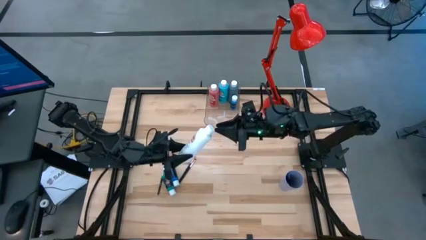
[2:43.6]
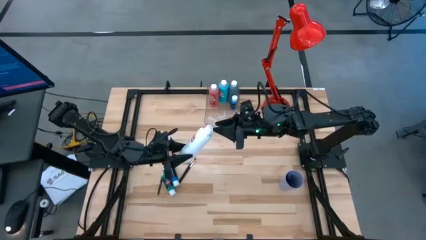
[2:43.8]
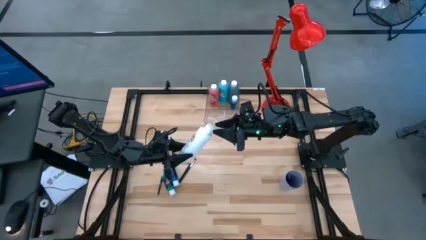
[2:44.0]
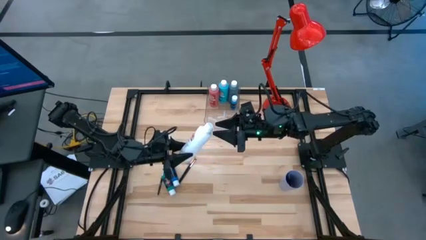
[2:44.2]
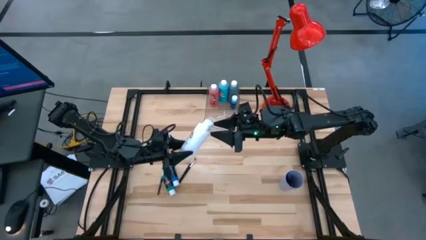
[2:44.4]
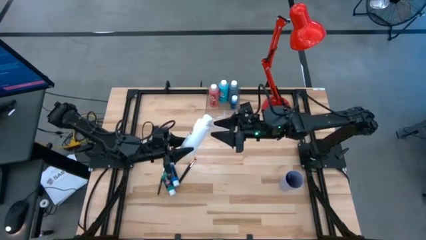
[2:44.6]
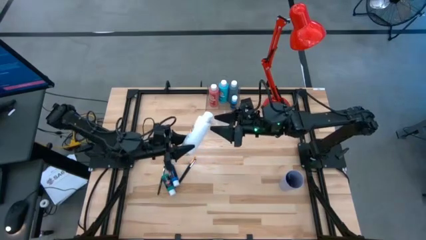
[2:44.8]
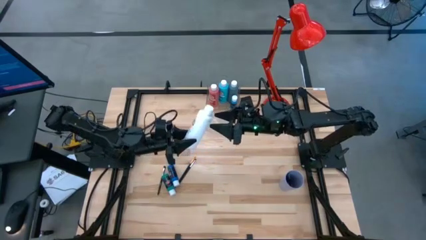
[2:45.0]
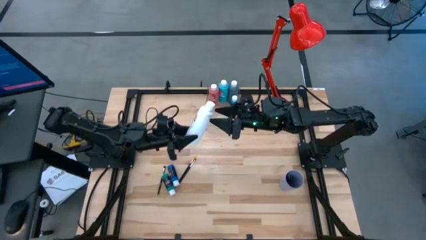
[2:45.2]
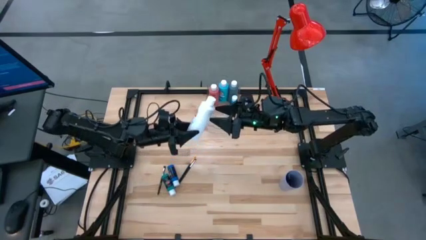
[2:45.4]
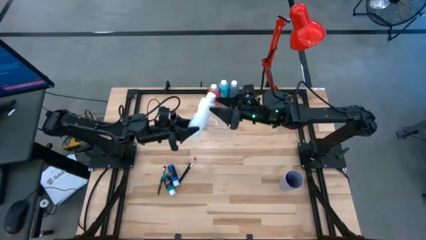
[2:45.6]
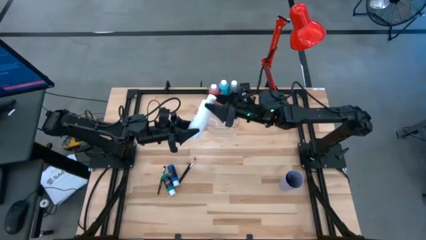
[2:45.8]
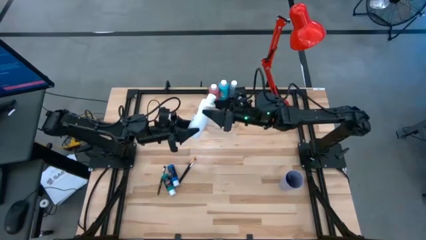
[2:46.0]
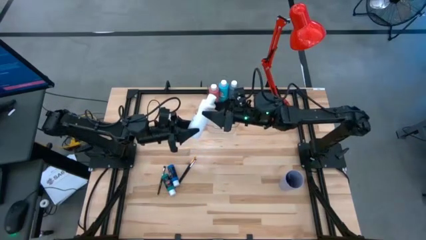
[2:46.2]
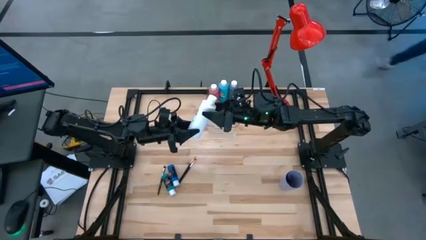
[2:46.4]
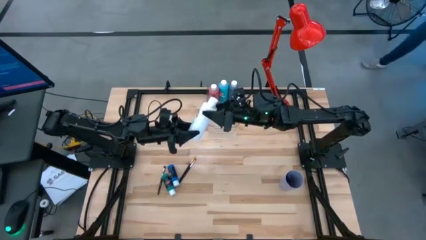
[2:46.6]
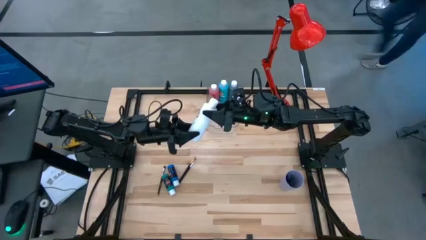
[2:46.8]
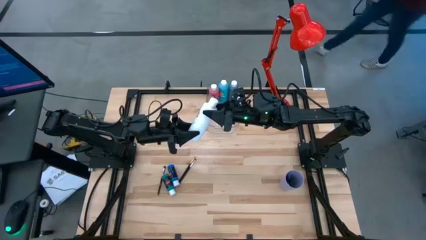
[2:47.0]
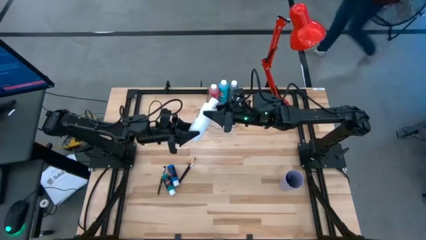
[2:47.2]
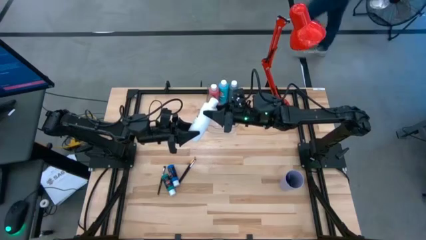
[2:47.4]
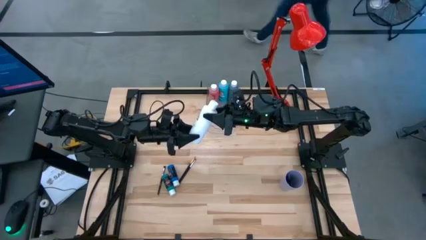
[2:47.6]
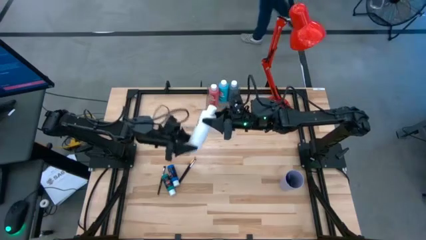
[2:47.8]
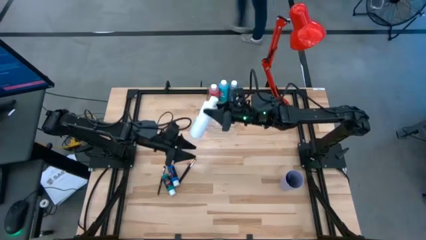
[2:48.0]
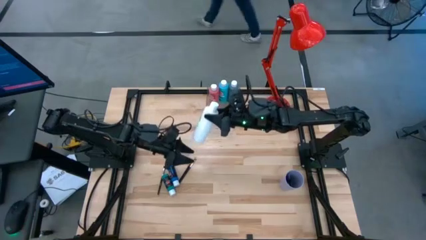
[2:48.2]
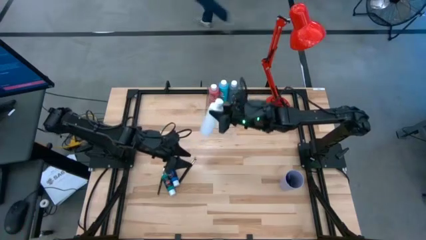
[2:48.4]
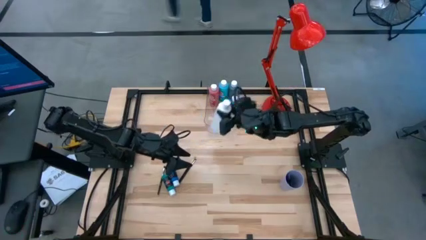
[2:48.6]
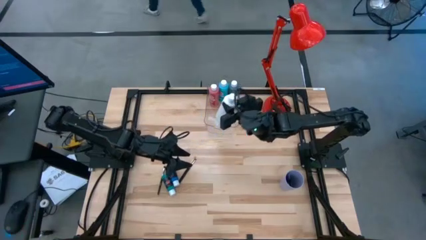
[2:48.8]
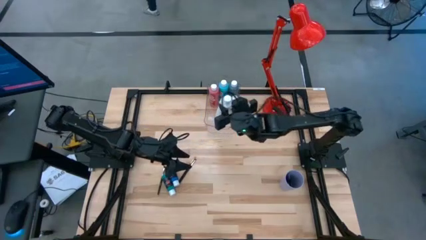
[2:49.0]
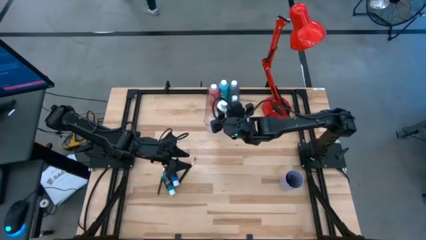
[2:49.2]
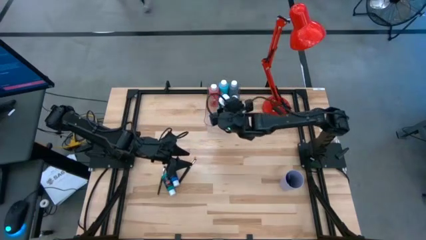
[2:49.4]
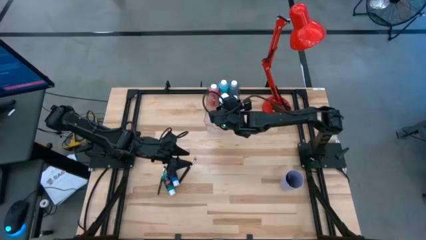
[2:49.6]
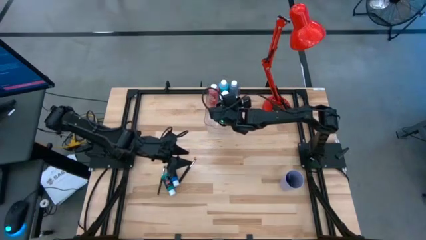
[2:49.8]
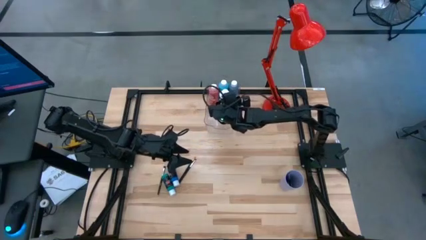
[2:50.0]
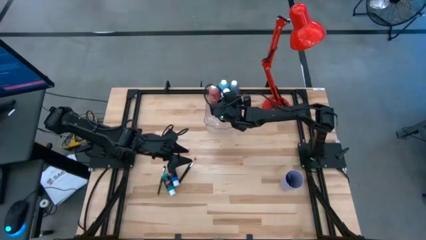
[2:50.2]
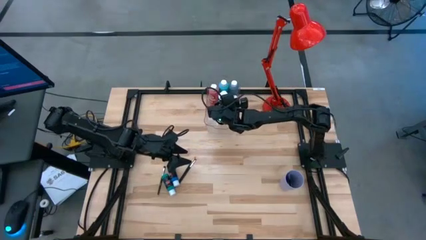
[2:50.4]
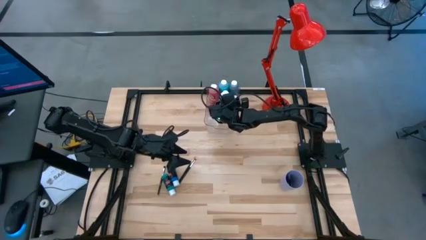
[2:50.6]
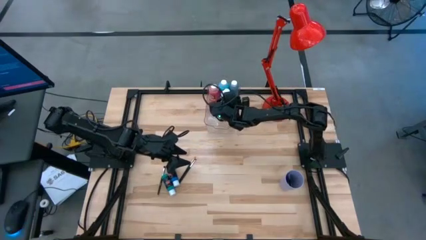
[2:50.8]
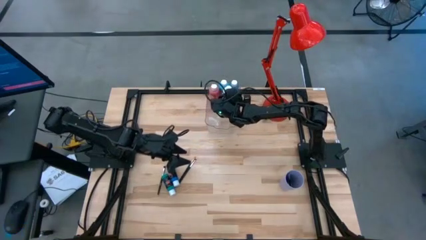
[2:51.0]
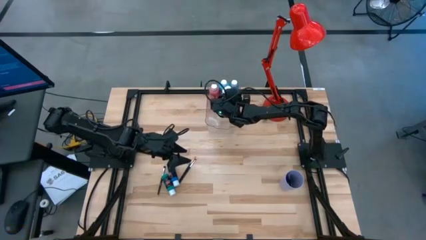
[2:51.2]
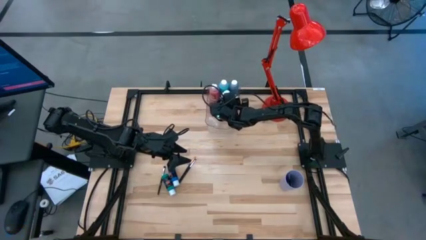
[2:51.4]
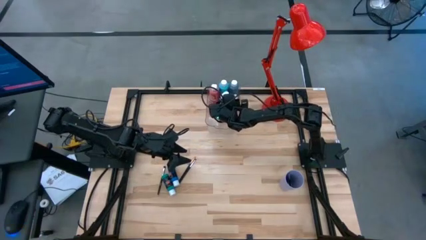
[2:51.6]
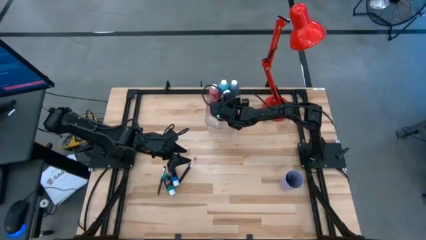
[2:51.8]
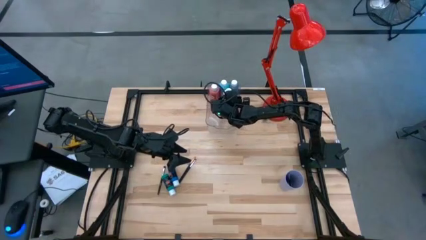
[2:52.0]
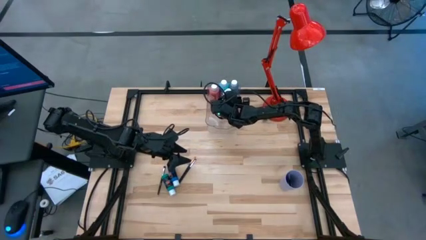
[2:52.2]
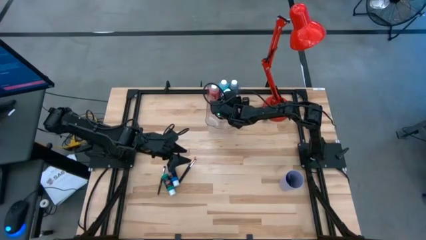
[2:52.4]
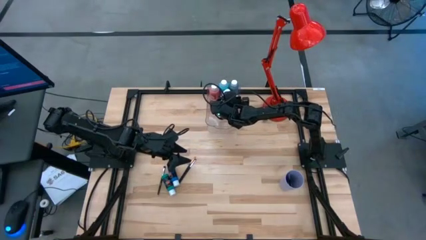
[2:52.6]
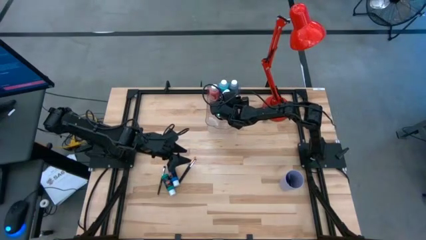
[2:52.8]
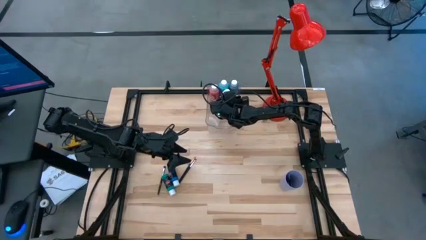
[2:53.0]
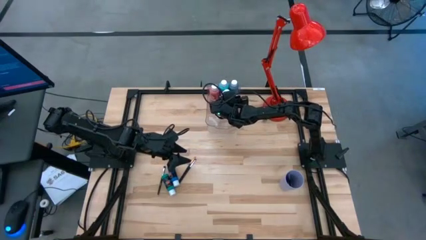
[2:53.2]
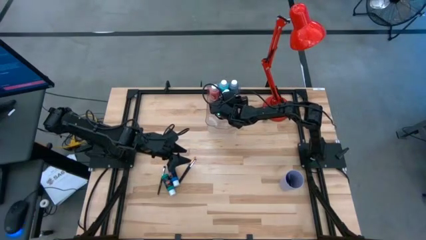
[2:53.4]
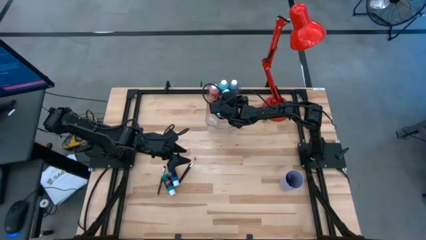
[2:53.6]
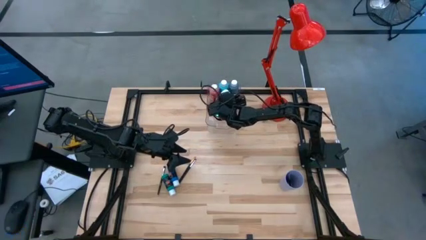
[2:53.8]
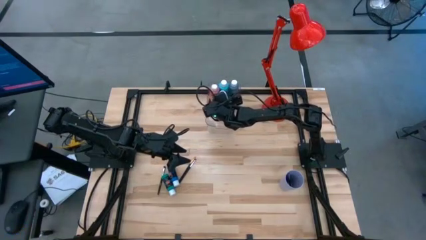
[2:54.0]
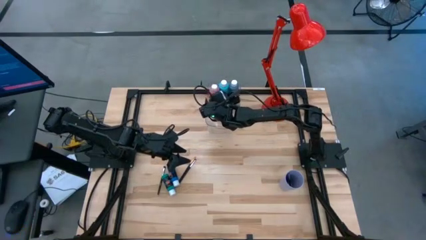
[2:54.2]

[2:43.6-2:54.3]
Task: Pick & Place Paint Supplies
Put the white paint bottle into the transparent bin

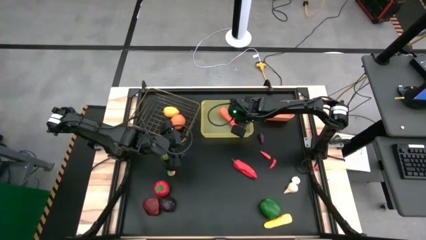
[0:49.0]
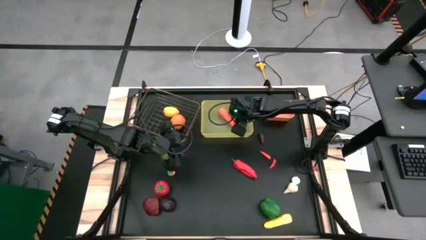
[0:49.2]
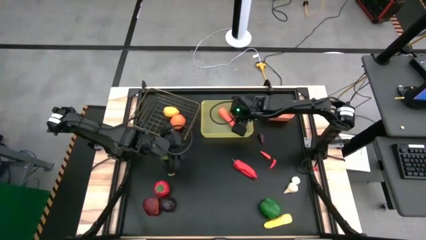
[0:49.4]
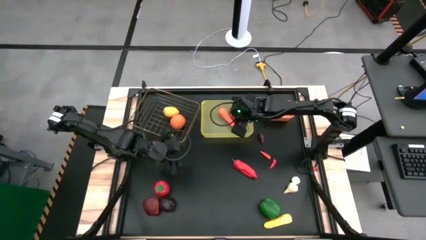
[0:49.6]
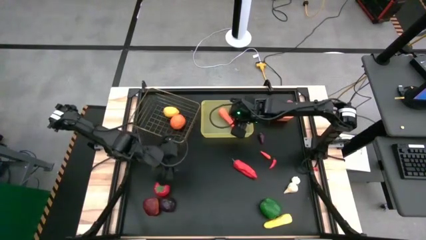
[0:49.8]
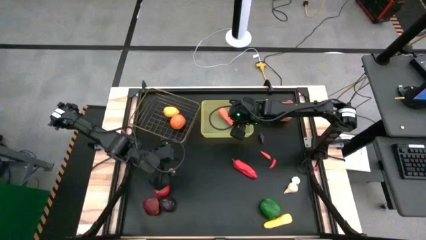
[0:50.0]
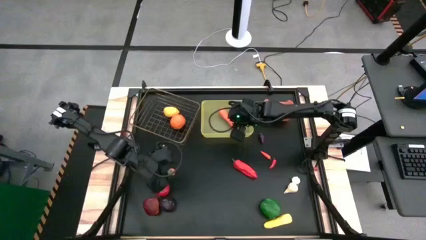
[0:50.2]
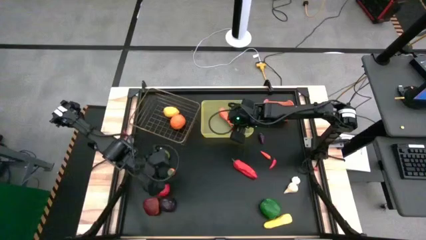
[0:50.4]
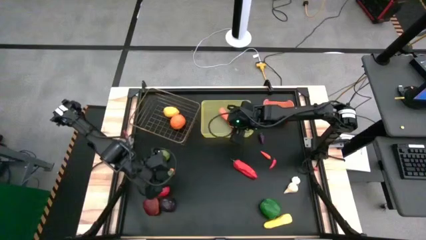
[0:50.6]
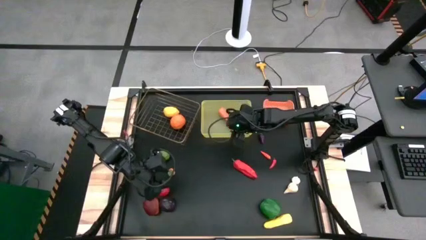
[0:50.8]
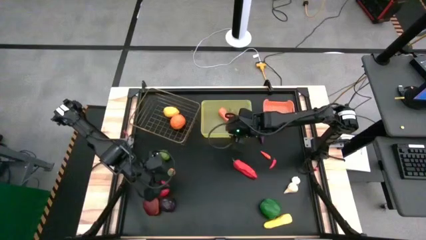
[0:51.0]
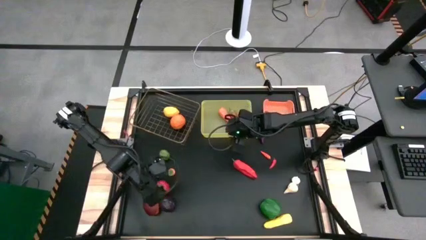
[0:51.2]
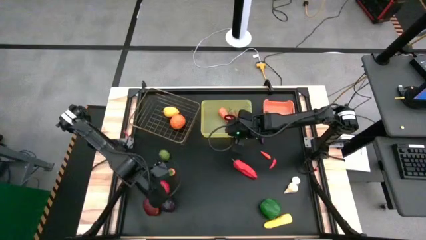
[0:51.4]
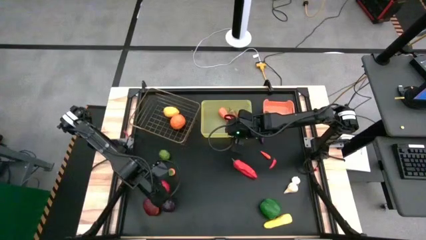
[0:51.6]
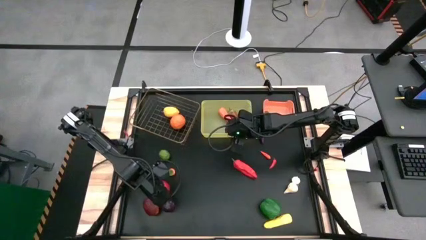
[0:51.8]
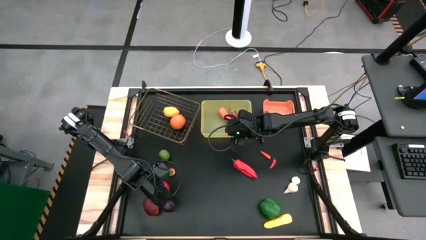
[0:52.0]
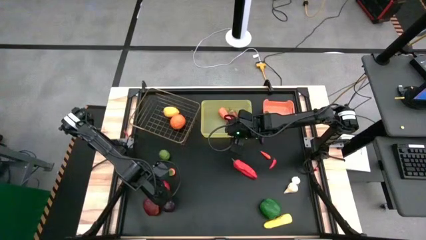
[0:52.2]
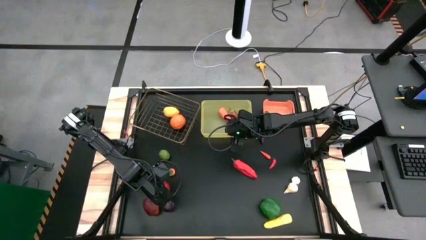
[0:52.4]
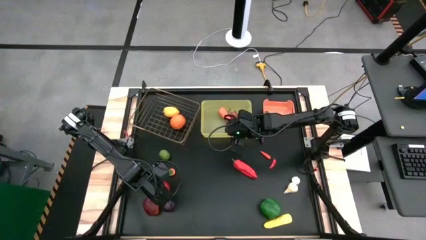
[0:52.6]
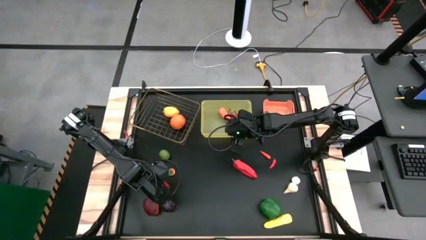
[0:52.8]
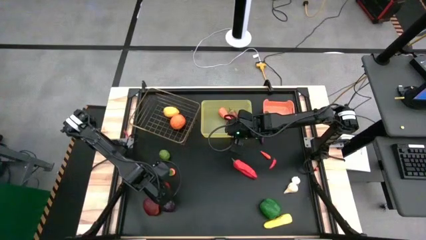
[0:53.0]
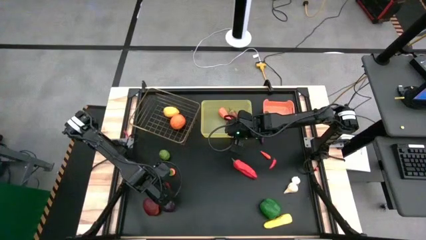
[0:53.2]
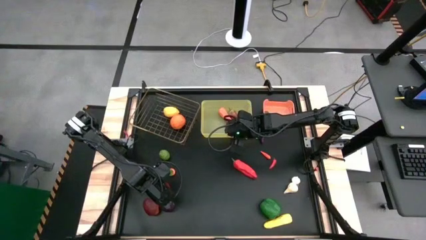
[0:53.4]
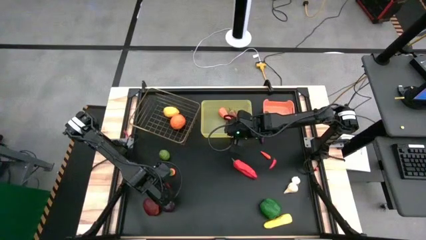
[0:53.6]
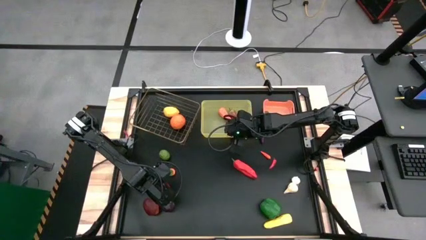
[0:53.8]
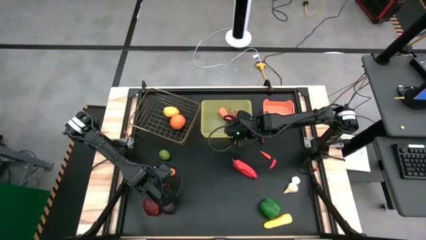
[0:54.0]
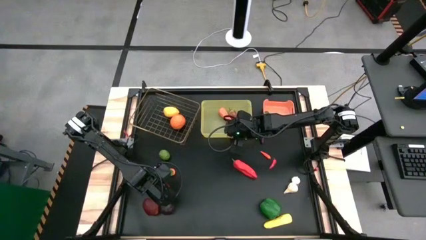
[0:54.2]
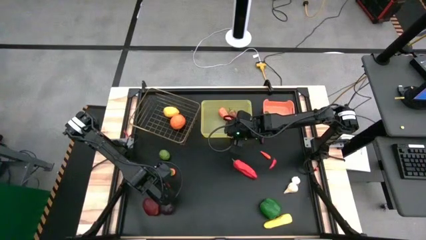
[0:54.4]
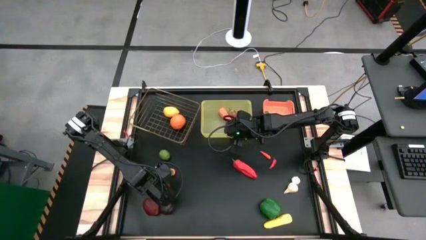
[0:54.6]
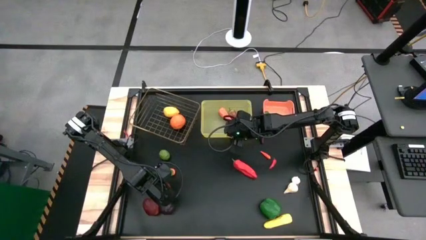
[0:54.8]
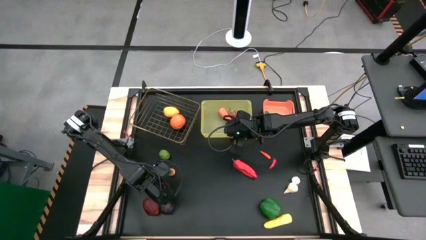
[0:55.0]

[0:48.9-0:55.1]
Task: Sort produce into baskets
Put the tomato into the wire bin
